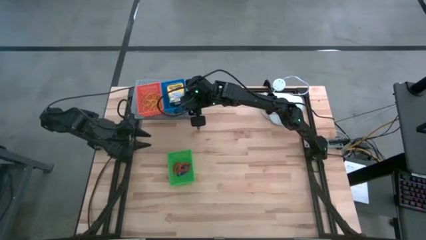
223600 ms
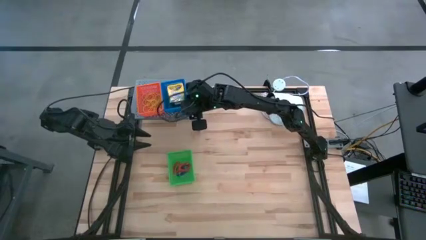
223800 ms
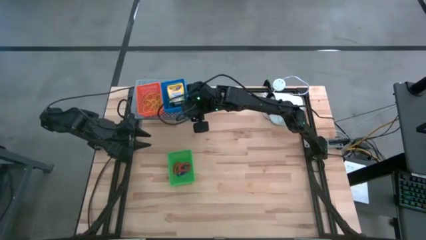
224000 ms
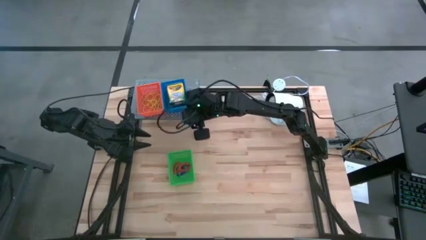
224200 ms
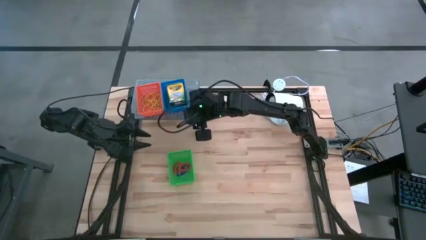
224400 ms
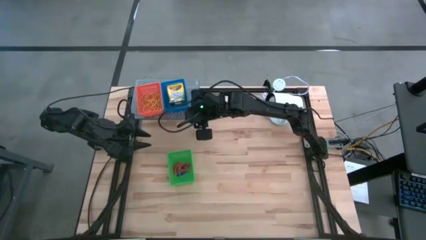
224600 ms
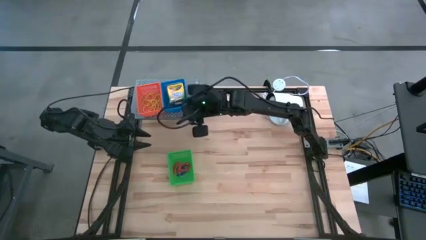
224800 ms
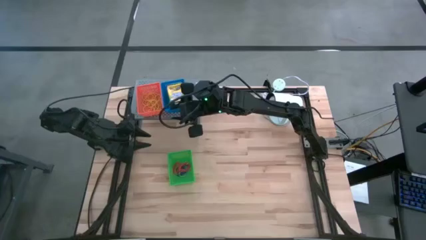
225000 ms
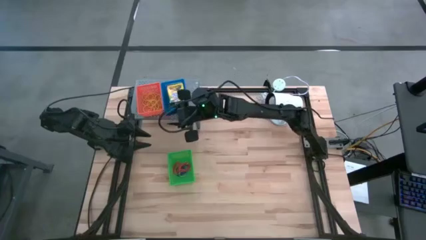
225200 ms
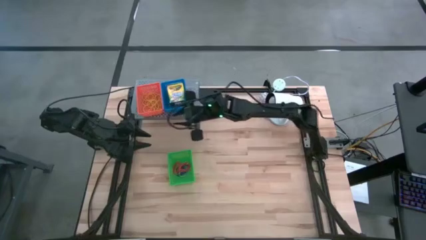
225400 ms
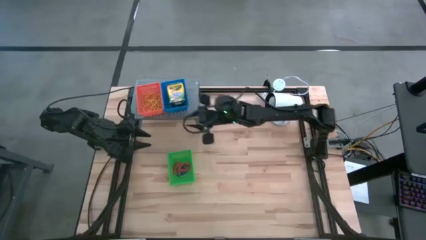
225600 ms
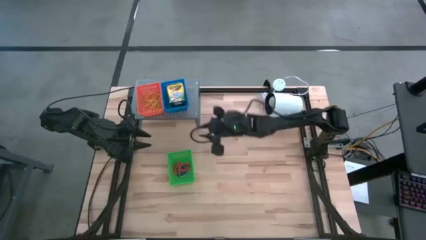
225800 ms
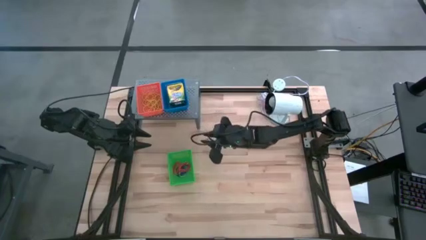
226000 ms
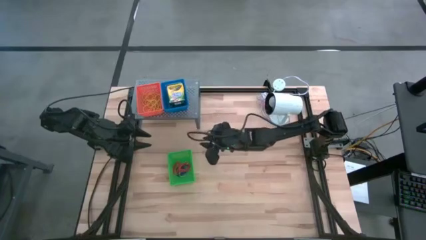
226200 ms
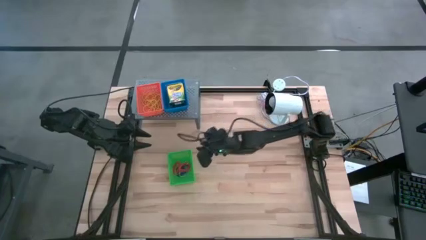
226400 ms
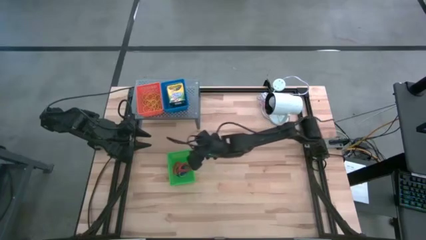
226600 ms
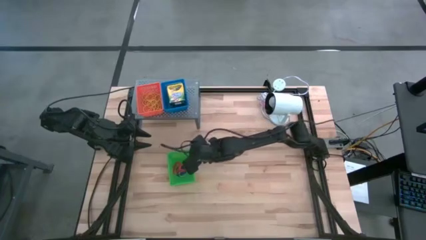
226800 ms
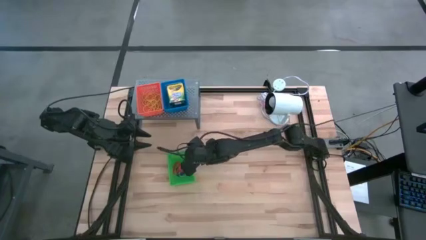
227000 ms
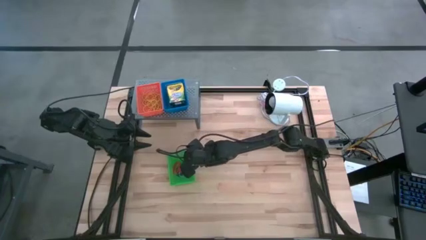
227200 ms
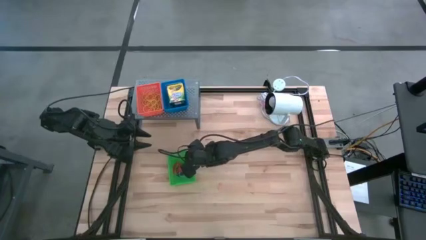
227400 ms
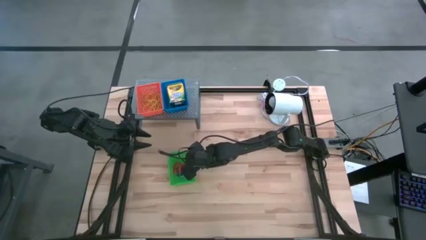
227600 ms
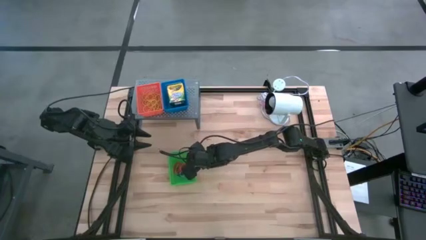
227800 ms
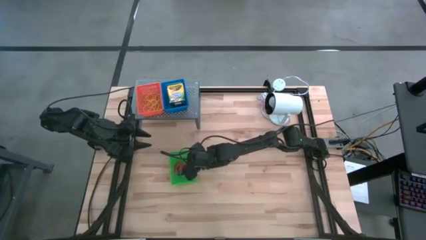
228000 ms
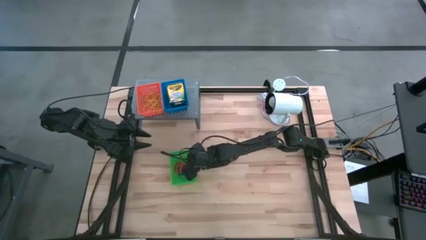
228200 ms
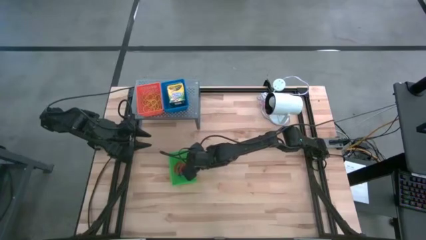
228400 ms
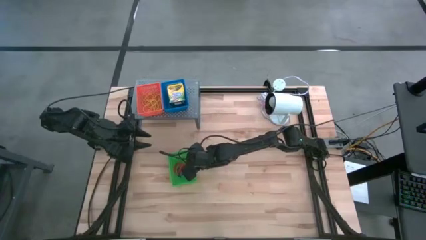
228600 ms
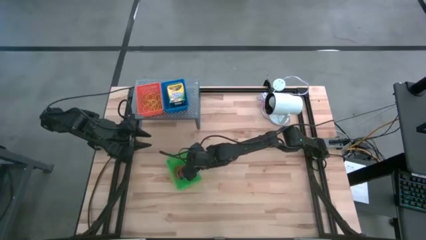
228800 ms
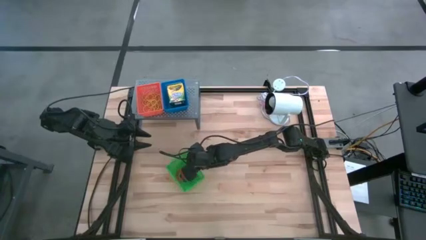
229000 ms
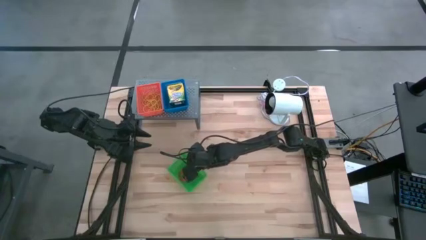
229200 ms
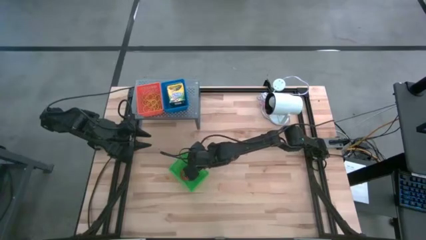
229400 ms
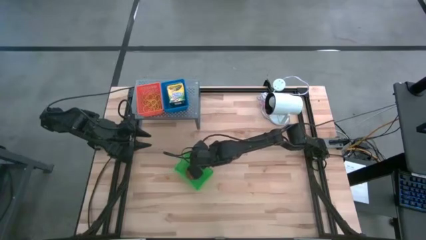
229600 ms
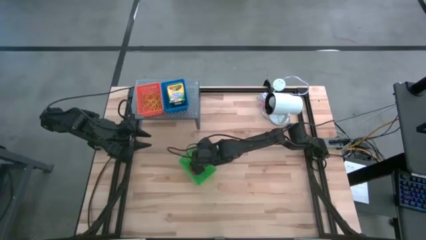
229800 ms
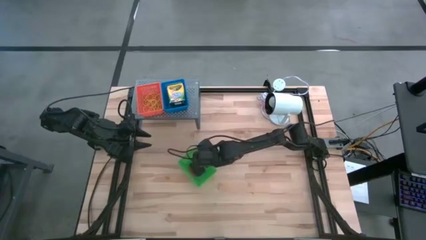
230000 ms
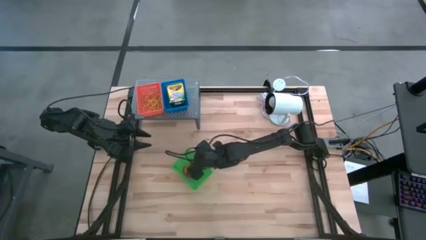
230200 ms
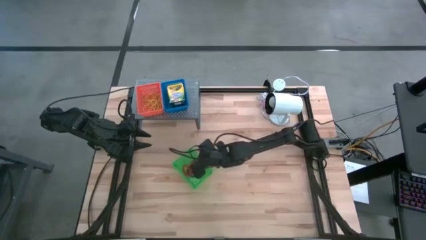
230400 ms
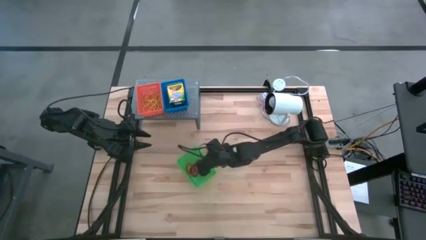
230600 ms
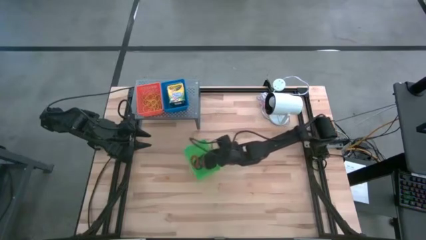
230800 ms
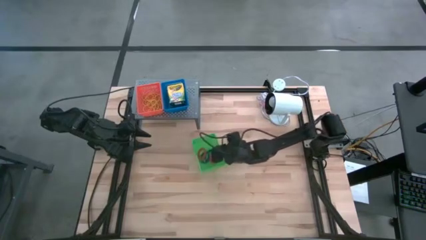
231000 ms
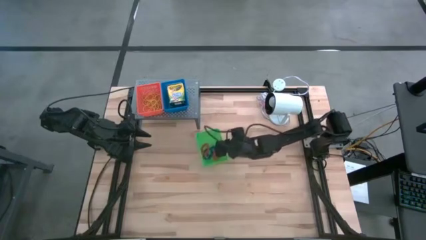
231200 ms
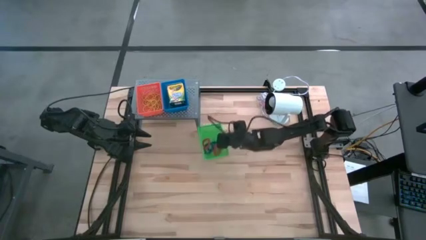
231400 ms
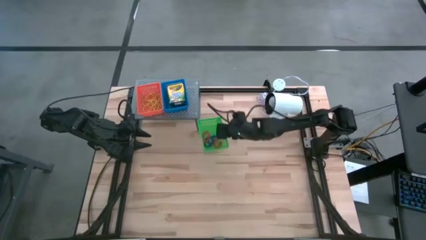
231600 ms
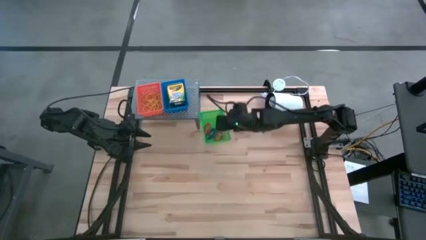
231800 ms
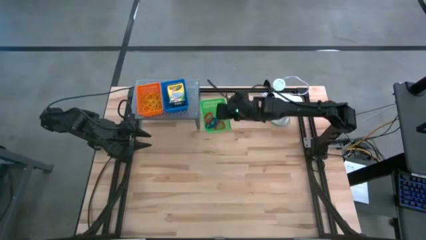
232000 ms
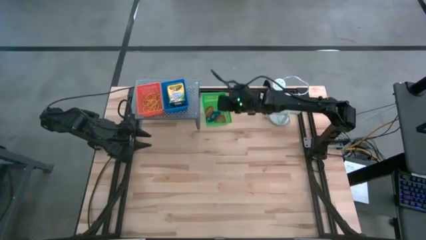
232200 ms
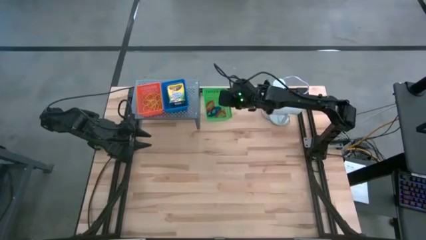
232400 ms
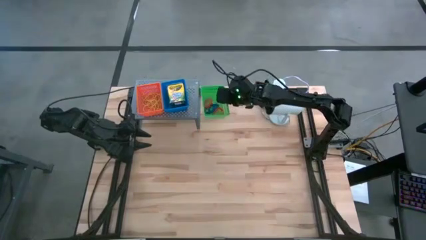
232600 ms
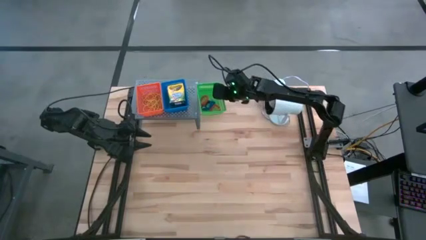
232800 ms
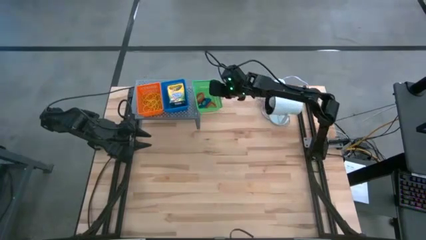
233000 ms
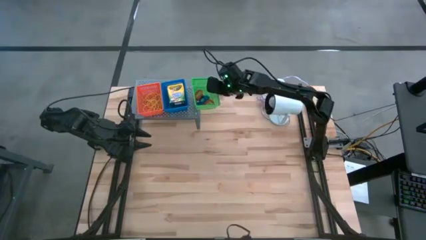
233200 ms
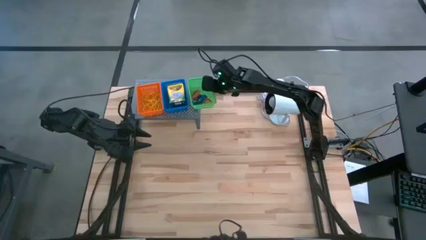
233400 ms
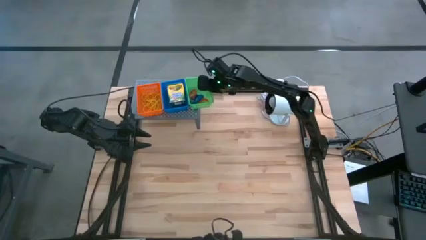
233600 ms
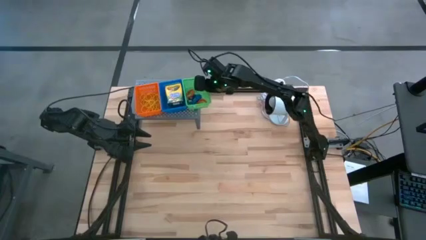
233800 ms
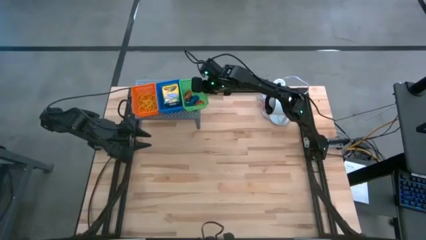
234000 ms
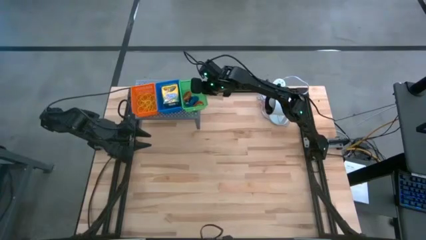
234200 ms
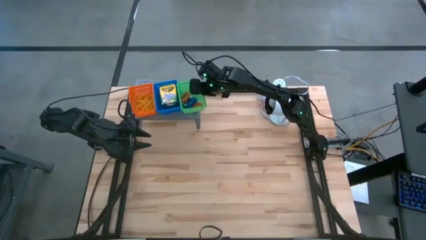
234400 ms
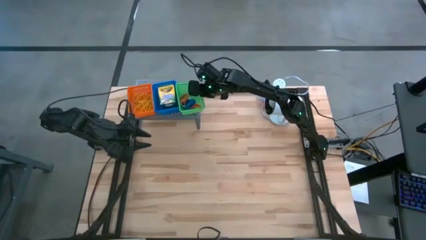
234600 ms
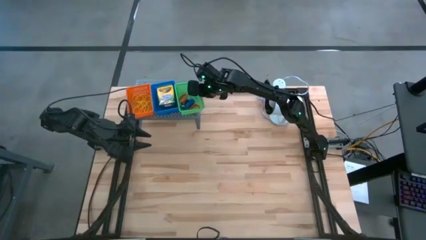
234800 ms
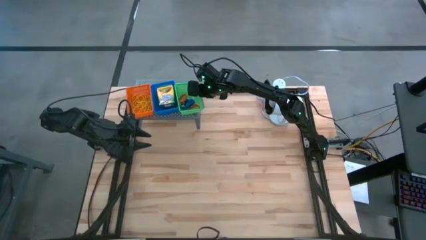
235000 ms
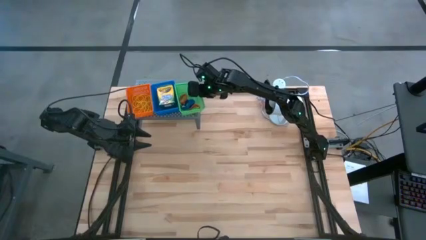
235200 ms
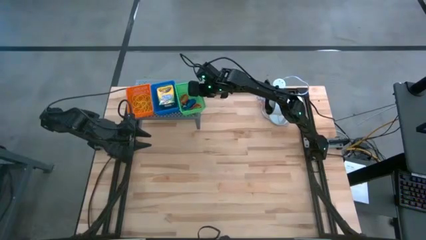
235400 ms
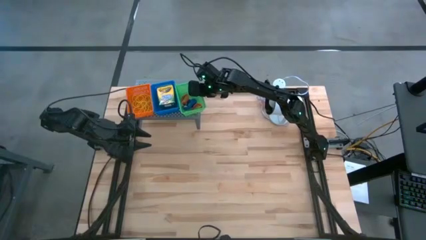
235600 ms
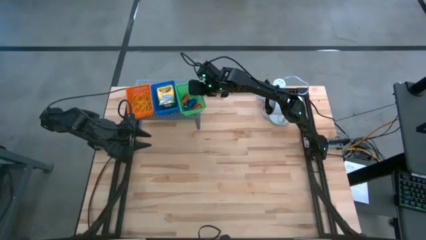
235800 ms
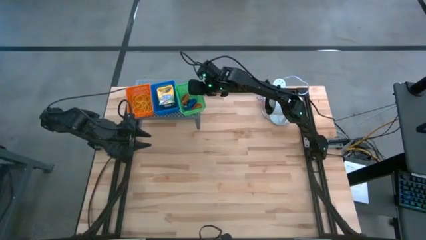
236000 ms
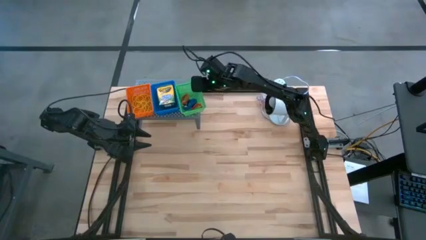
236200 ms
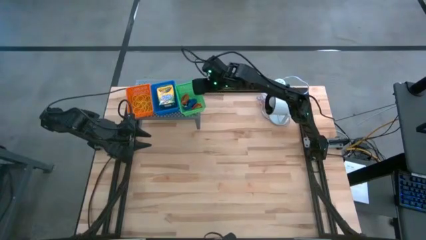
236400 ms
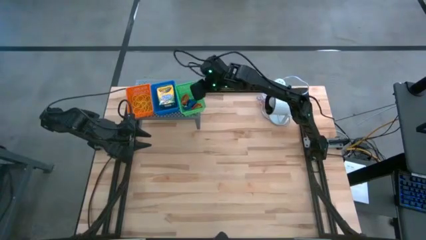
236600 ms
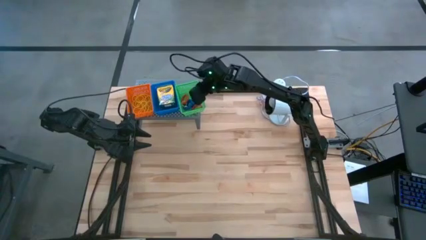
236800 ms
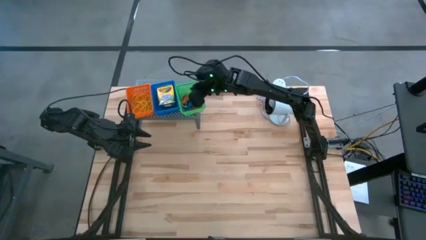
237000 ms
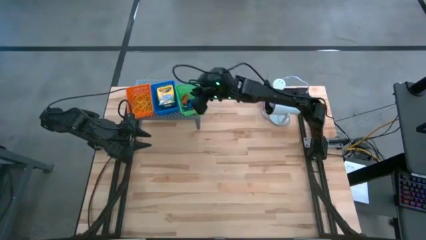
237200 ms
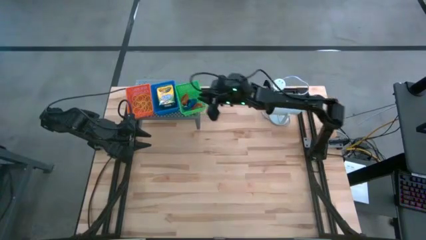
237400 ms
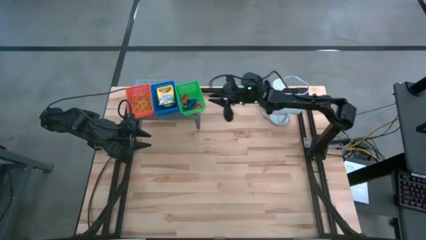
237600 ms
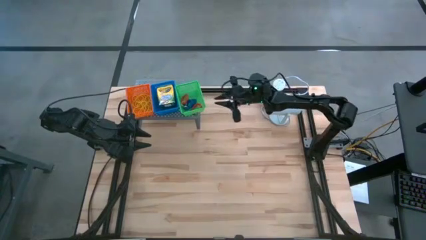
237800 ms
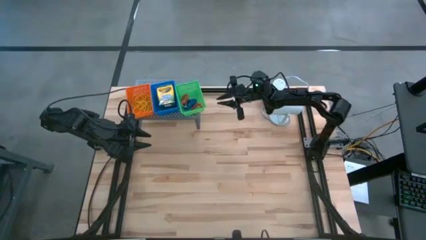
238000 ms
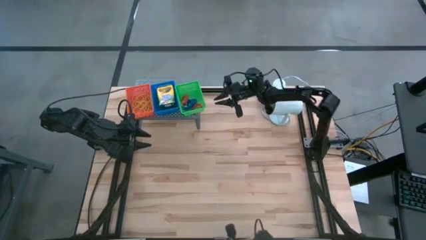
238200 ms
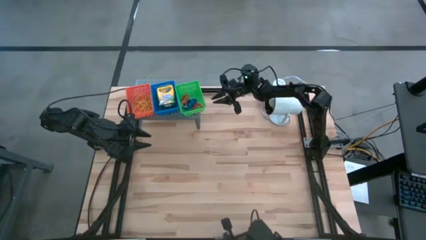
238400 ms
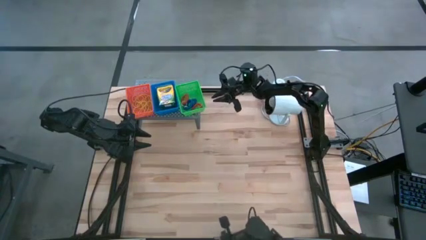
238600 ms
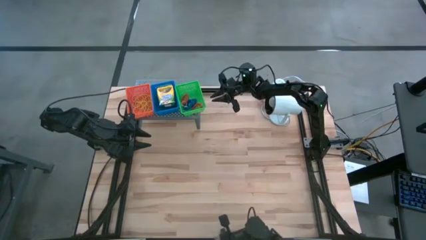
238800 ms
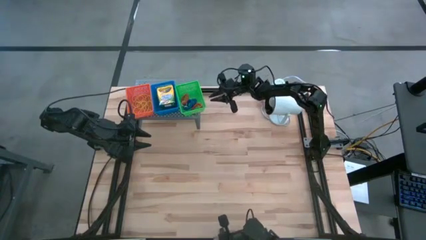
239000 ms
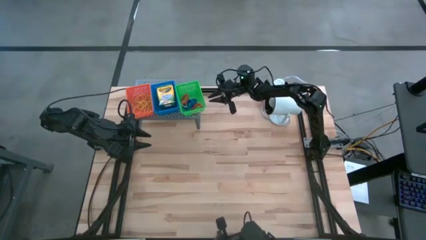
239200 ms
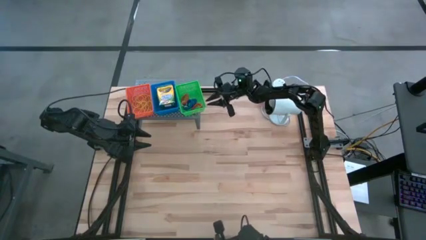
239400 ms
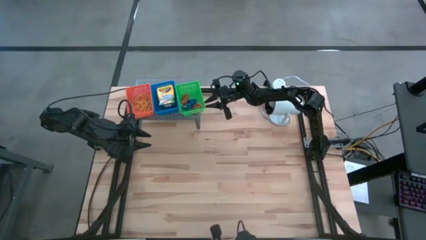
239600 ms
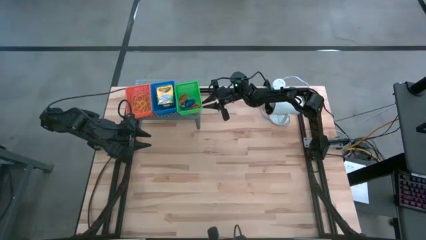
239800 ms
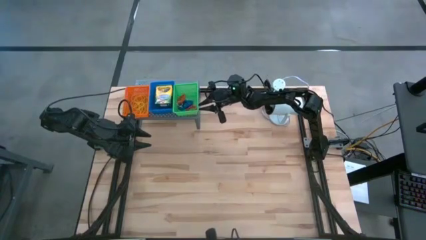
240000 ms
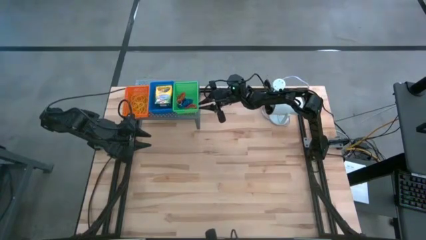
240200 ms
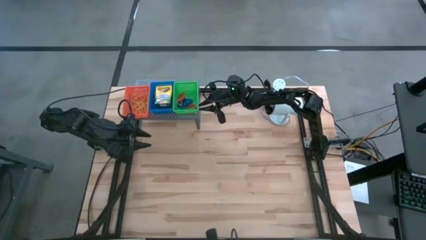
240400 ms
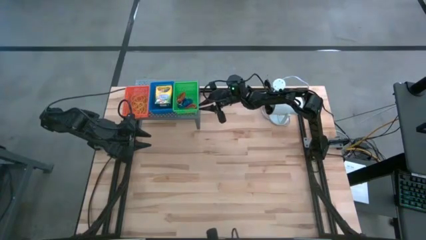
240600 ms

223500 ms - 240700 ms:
Task: Pick & Place Office Desk Supplies
Put the green bin filled with spring keychains on the shelf
